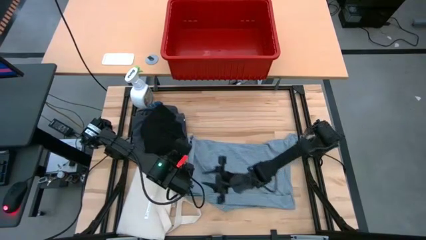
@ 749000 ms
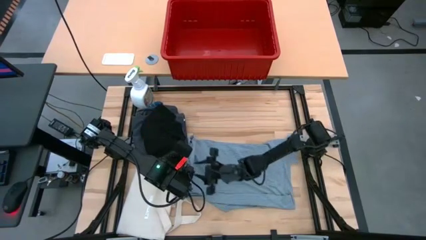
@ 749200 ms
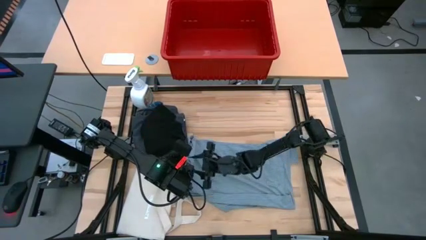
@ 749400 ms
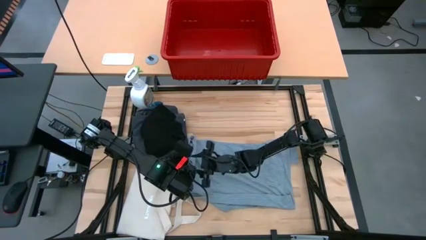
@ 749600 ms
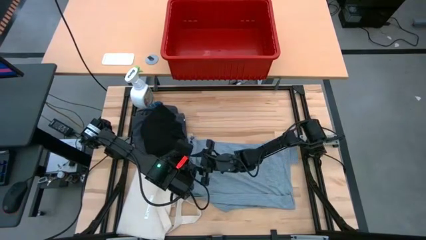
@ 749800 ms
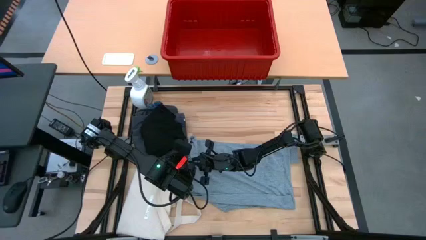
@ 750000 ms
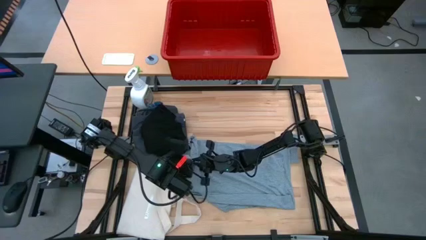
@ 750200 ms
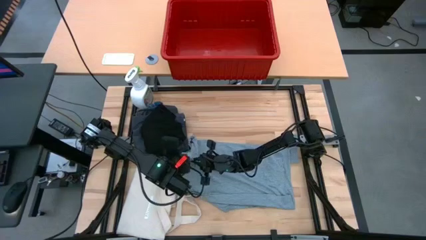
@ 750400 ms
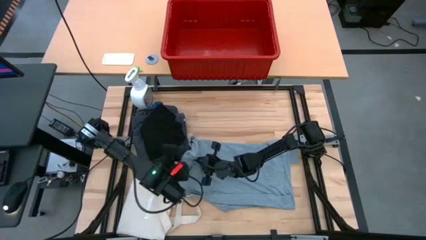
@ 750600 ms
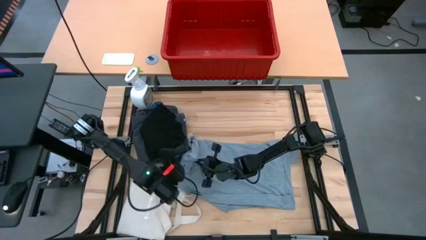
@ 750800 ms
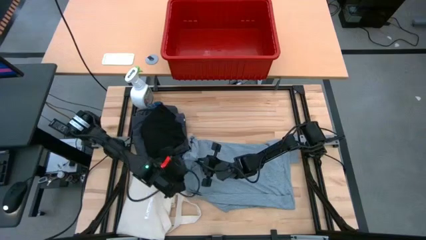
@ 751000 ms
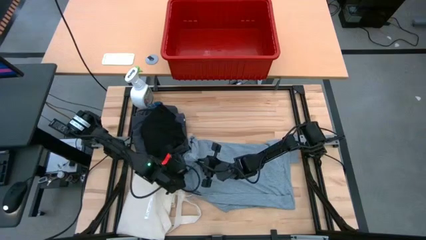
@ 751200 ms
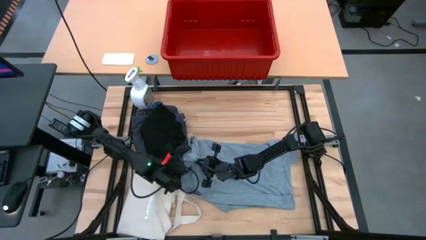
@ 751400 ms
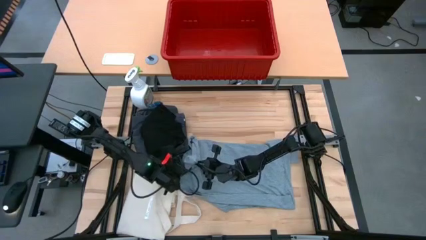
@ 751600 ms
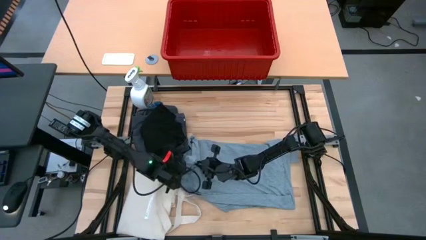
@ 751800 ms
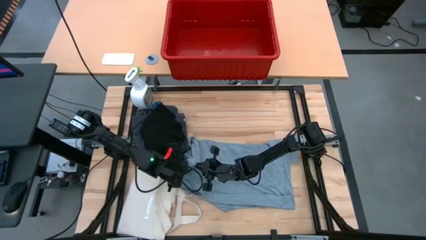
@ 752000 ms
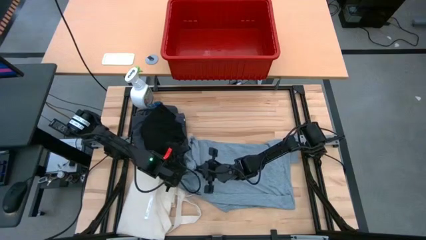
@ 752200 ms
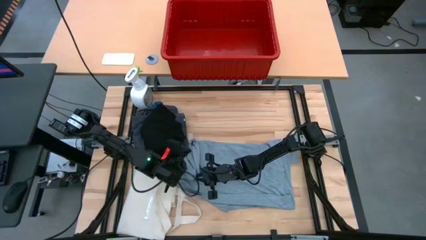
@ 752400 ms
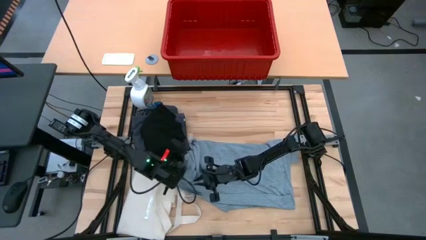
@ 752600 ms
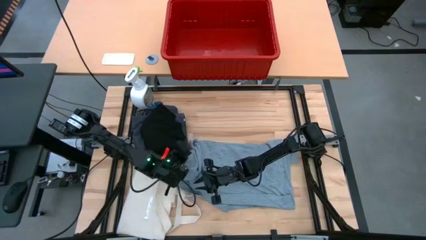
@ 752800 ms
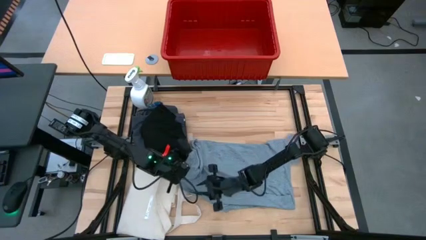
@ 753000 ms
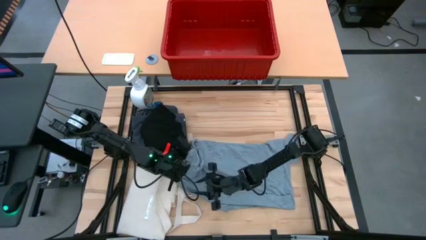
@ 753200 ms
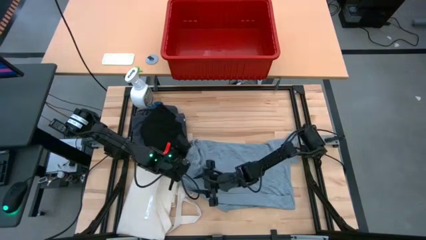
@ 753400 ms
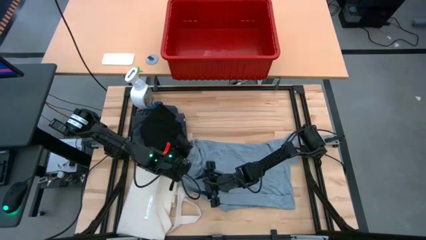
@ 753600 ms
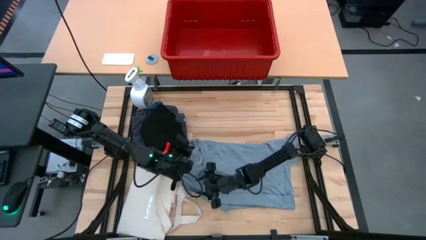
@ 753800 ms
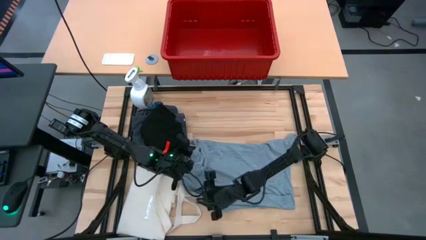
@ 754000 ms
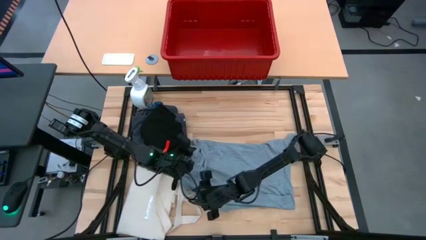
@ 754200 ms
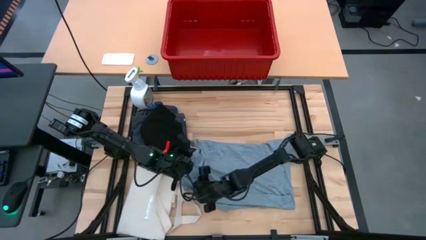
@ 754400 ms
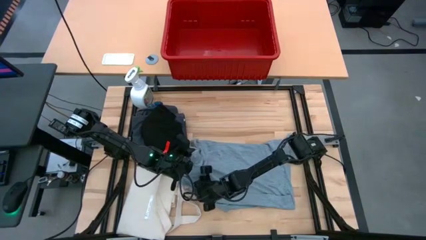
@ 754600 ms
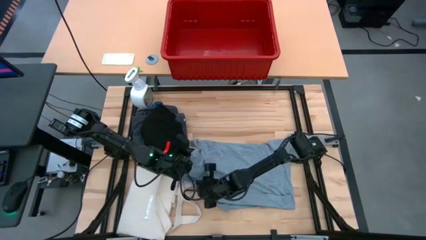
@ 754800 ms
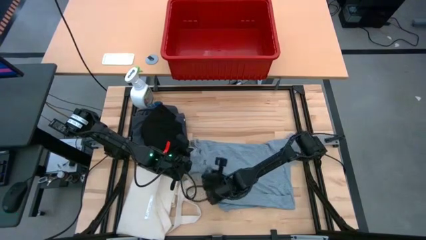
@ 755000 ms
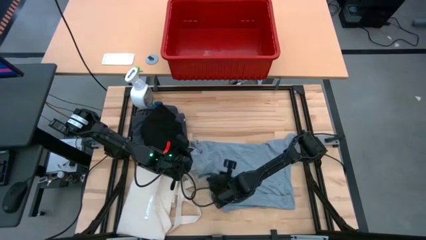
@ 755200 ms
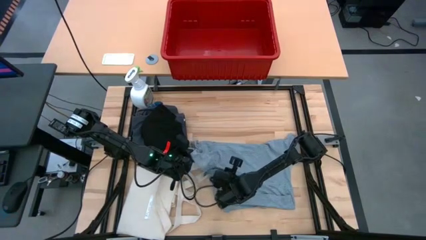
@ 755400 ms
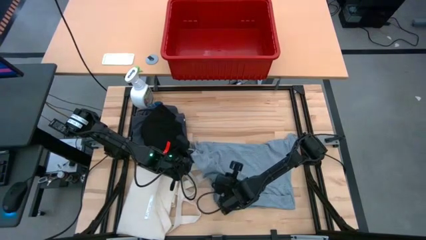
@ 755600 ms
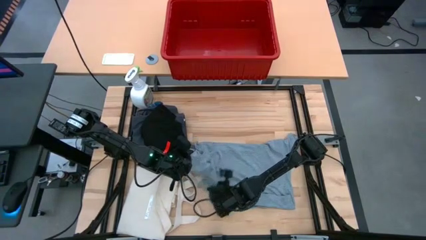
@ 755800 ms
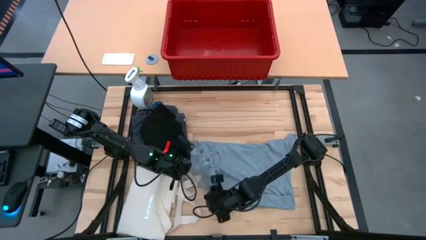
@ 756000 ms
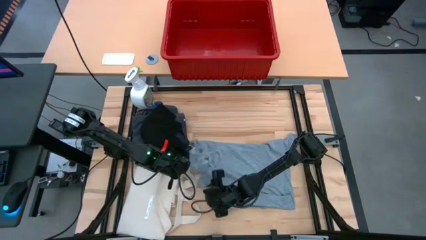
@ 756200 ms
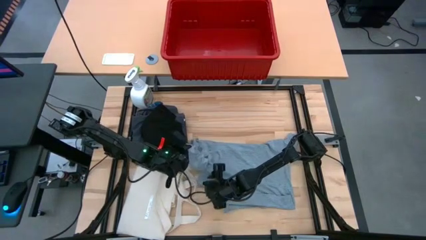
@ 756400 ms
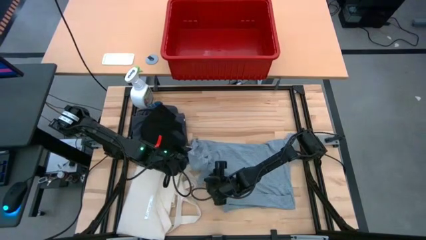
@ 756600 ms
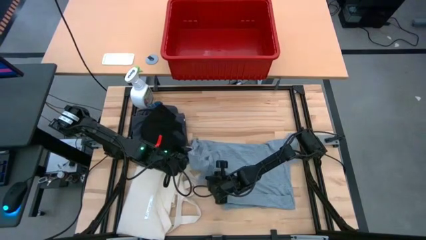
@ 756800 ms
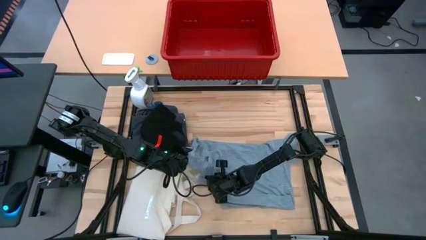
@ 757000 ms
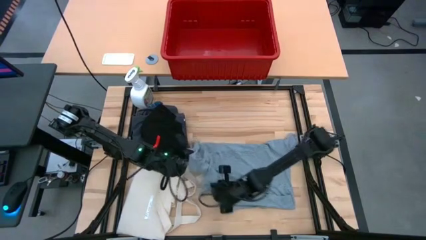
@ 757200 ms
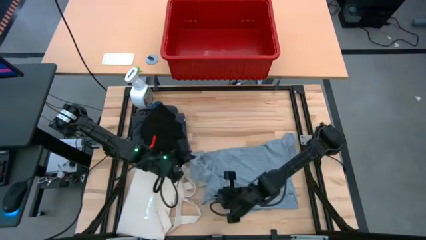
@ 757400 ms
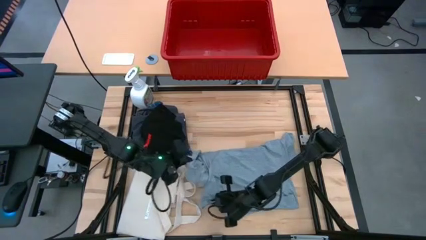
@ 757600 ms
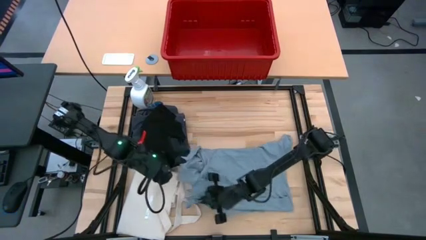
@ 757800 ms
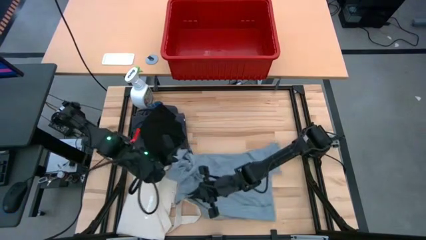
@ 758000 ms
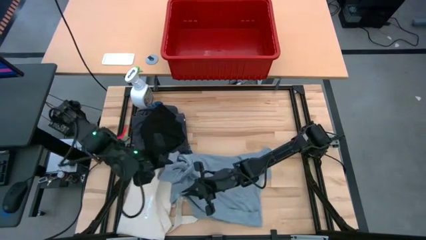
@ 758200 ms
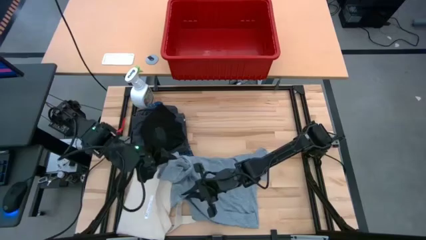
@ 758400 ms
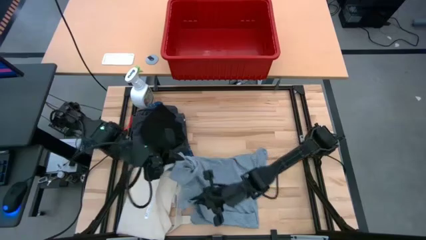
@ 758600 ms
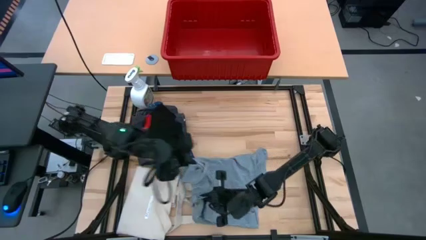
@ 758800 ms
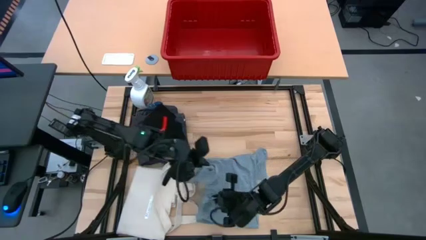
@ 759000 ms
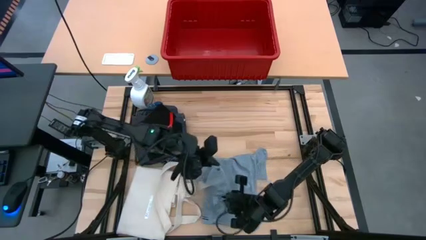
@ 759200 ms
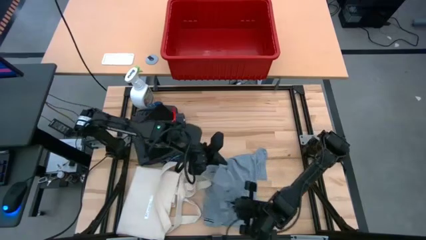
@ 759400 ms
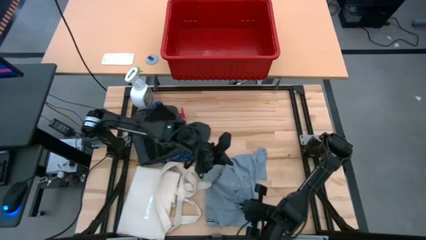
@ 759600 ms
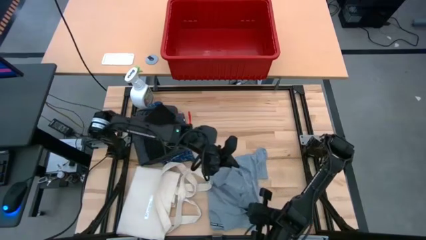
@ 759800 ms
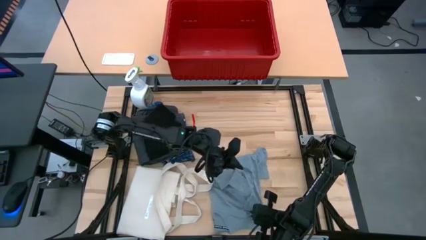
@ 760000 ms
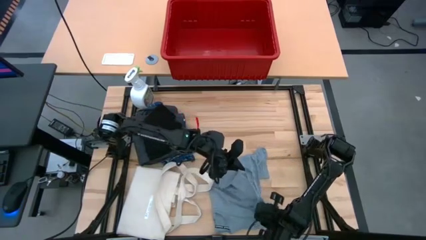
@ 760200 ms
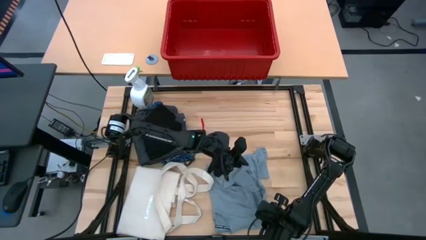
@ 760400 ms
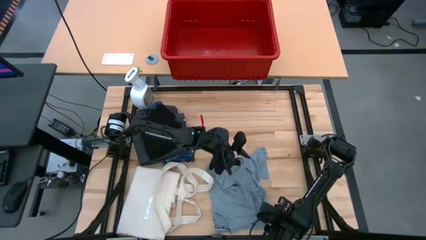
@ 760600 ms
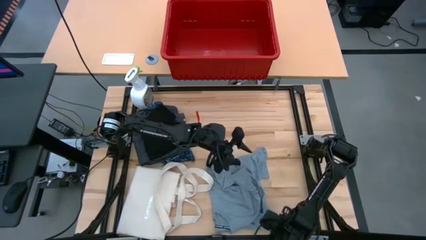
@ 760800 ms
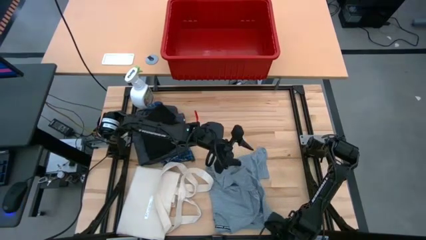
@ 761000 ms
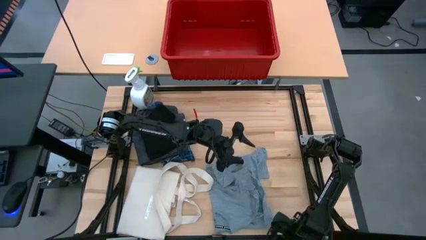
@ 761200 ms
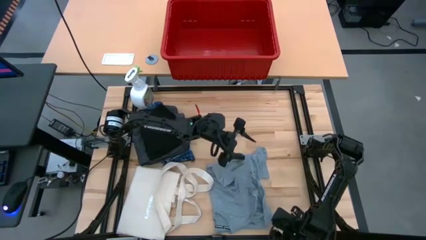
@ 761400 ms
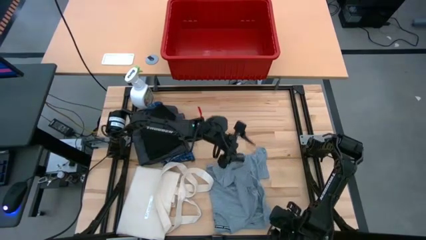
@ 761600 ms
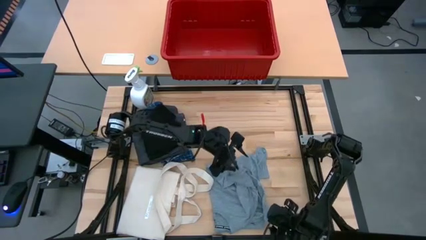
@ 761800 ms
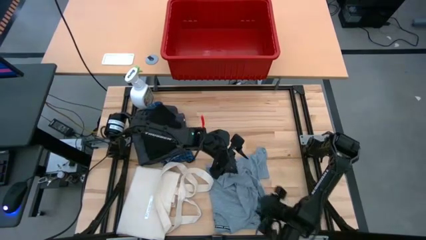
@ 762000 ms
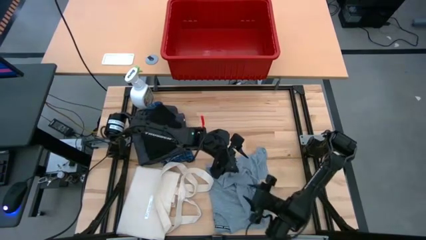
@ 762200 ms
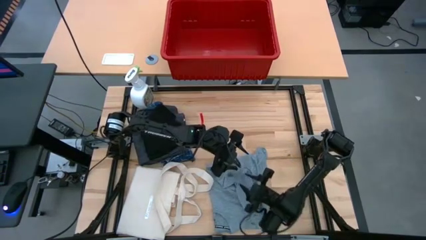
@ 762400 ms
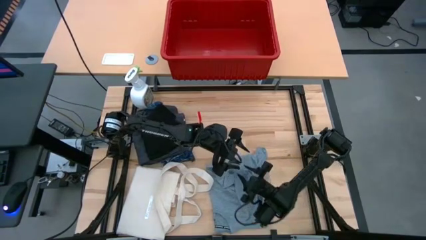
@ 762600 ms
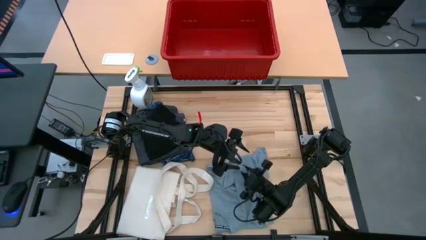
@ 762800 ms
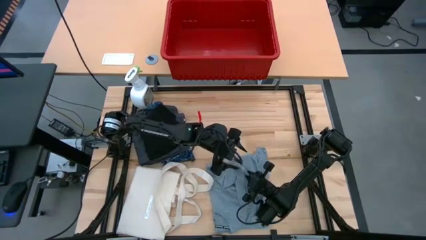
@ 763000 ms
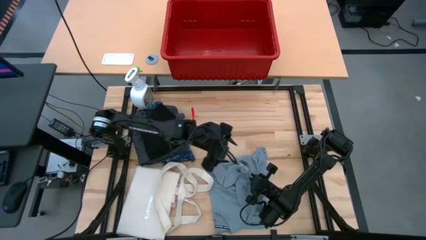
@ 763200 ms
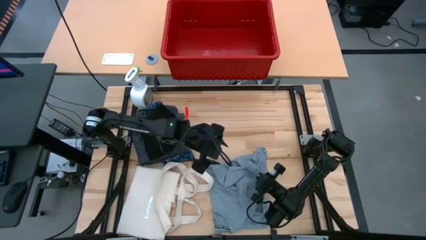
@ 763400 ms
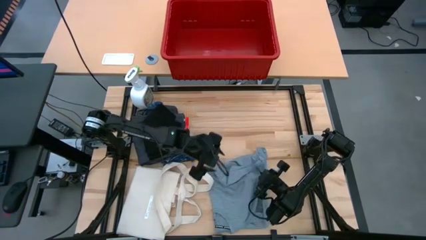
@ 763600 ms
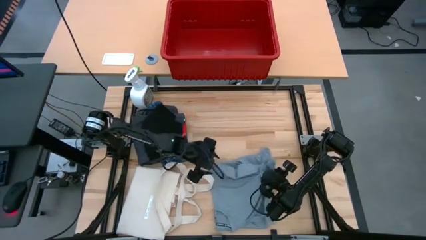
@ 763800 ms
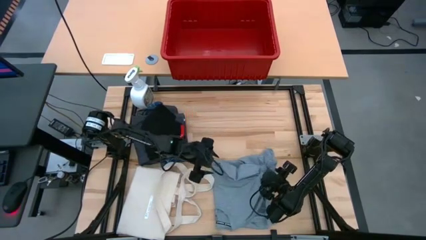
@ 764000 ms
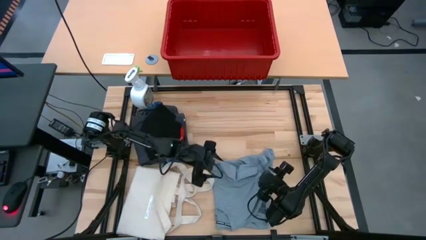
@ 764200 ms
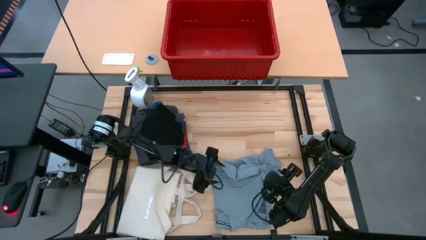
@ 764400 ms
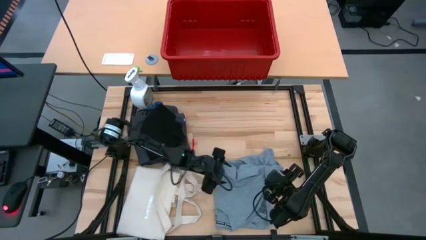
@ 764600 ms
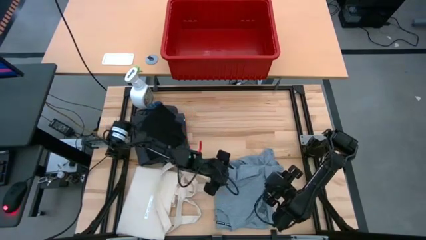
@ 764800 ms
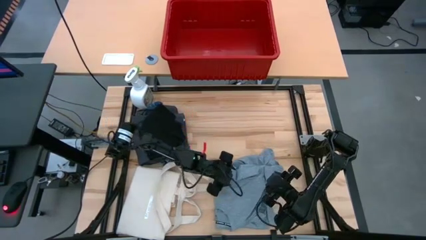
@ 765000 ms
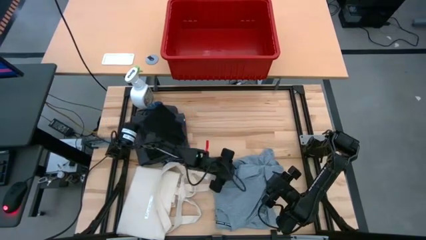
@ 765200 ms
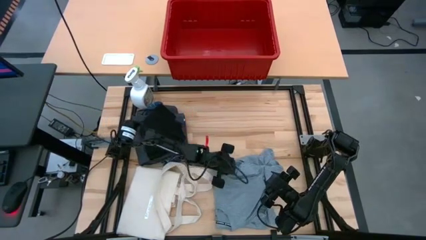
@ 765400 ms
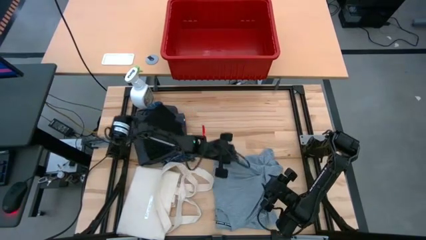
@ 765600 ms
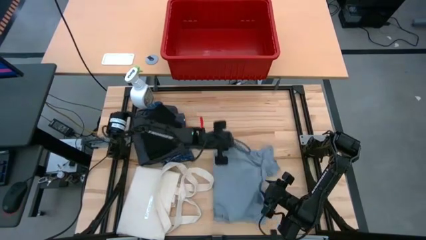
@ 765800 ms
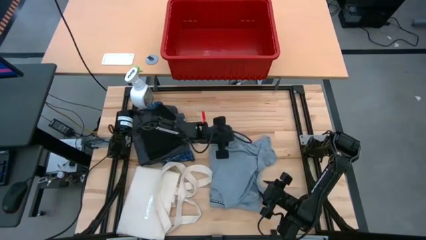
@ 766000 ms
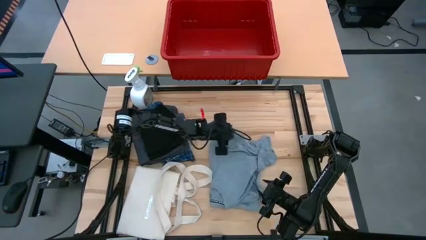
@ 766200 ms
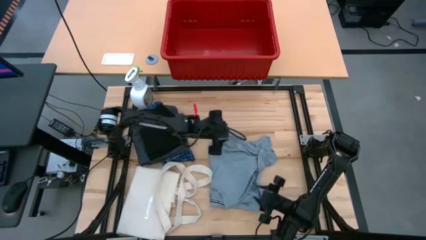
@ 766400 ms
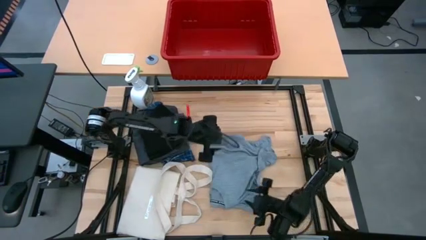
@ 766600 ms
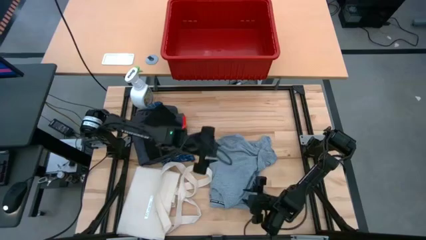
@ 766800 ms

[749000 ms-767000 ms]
Task: Fold Laundry from Bin
Fold the gray shirt
